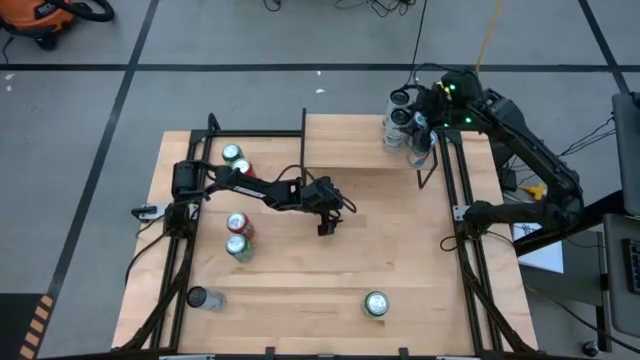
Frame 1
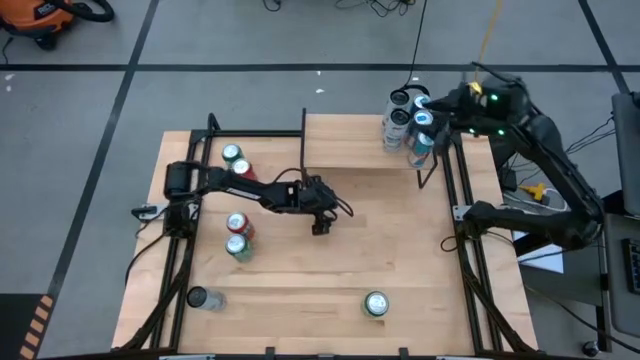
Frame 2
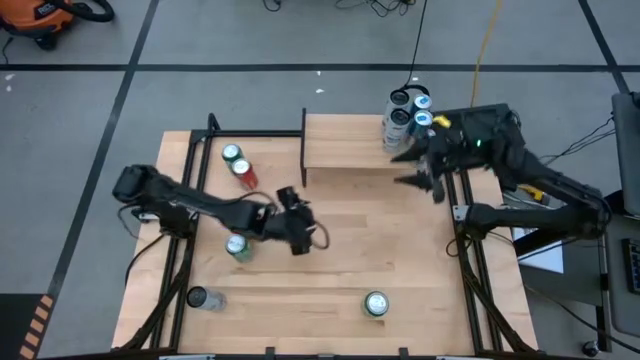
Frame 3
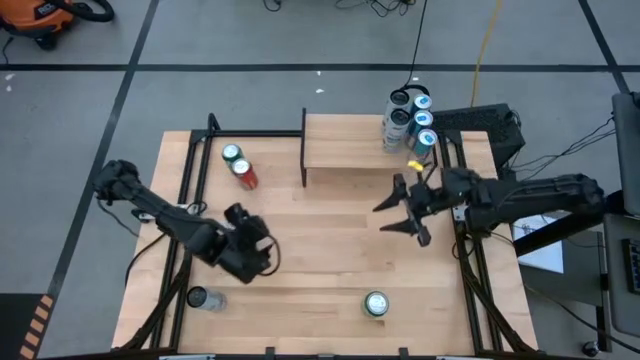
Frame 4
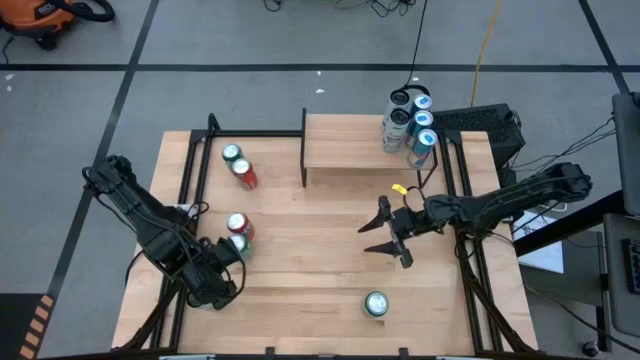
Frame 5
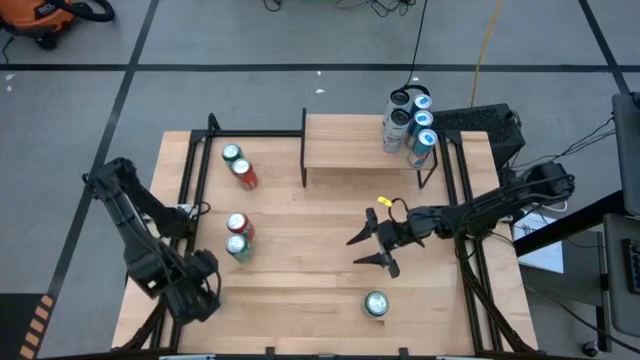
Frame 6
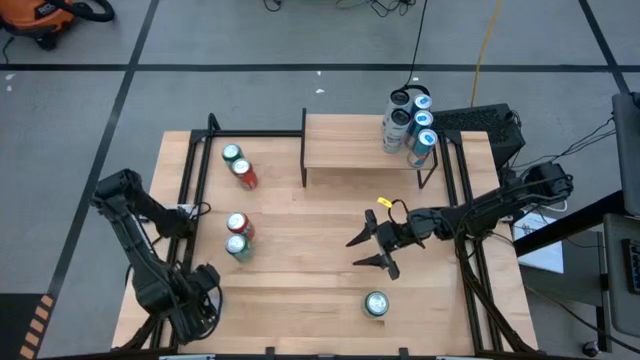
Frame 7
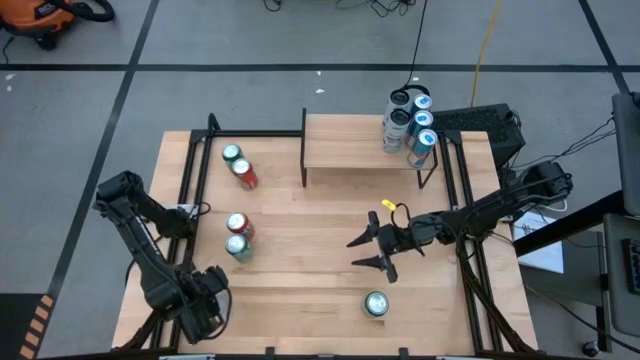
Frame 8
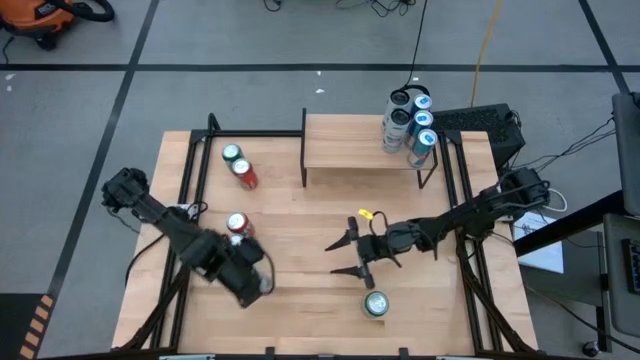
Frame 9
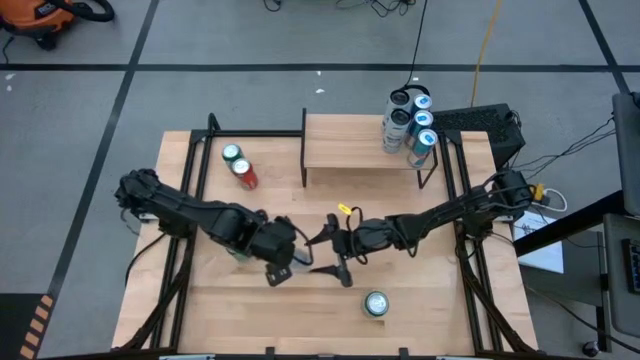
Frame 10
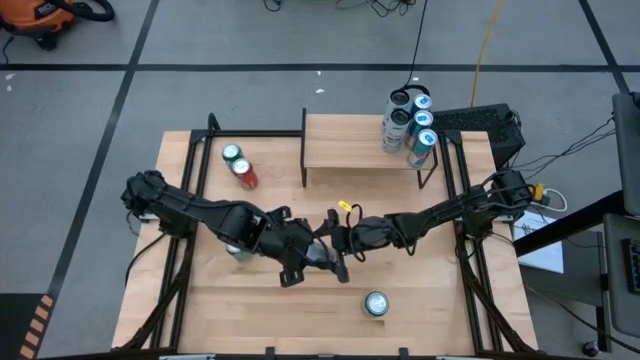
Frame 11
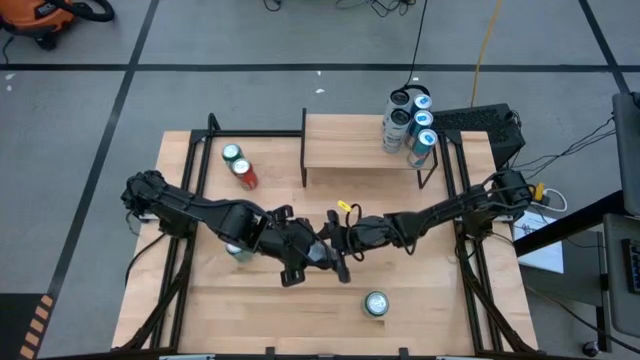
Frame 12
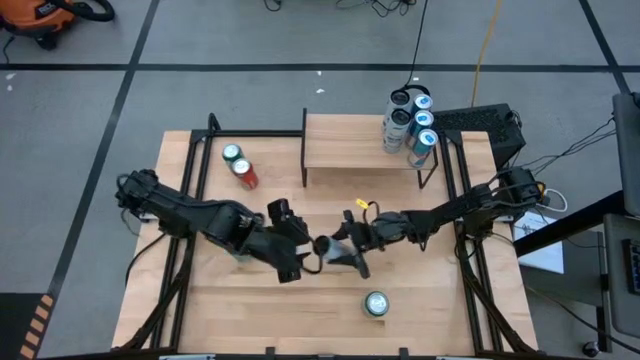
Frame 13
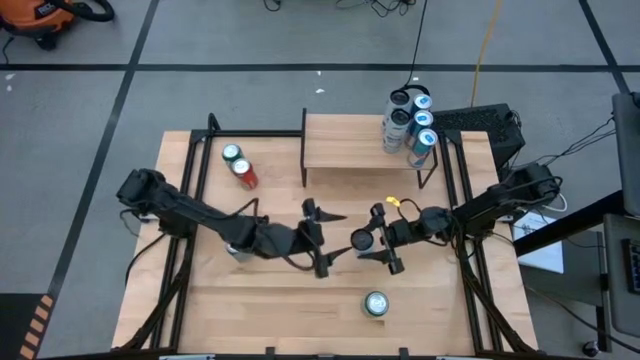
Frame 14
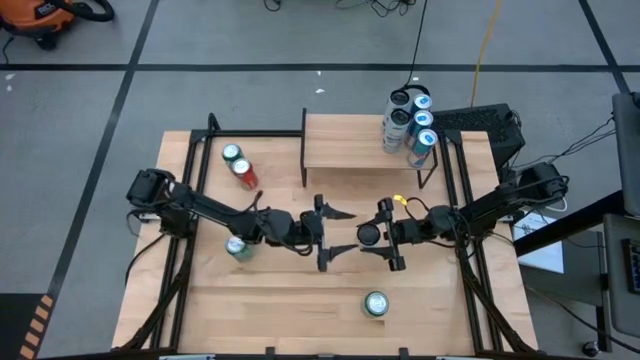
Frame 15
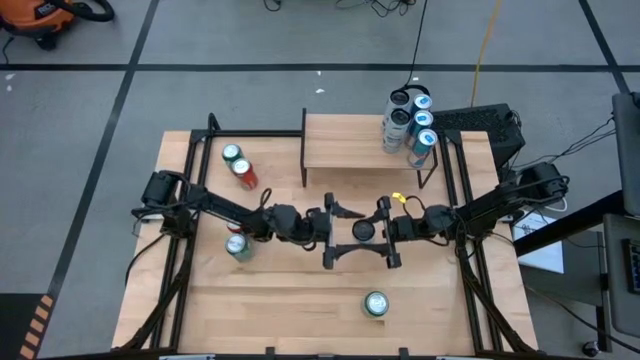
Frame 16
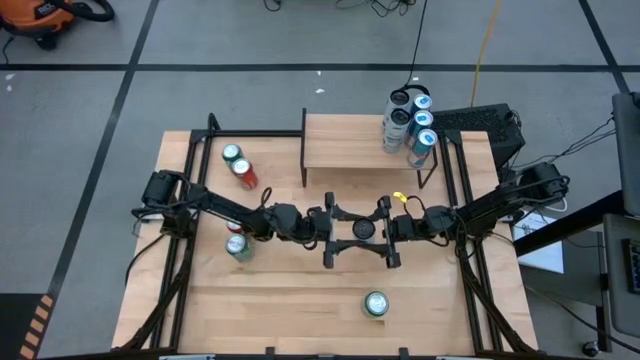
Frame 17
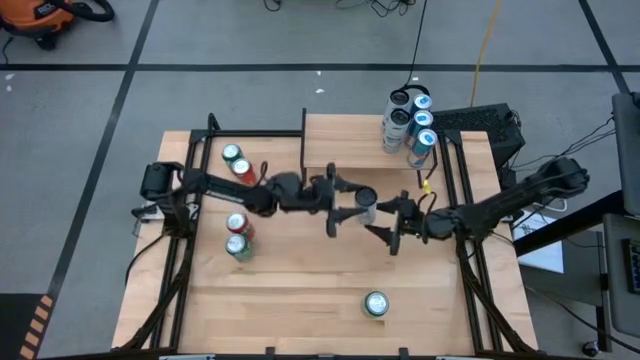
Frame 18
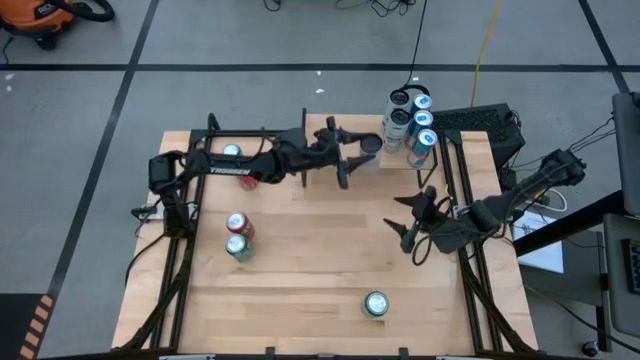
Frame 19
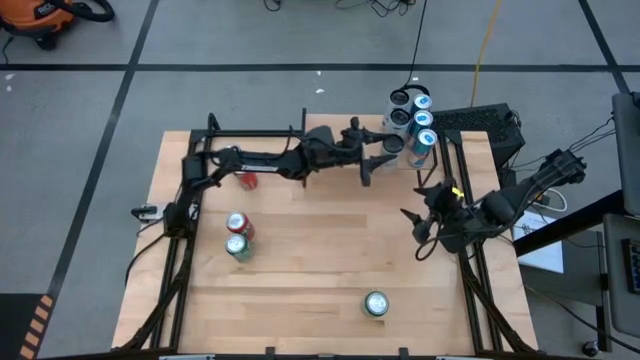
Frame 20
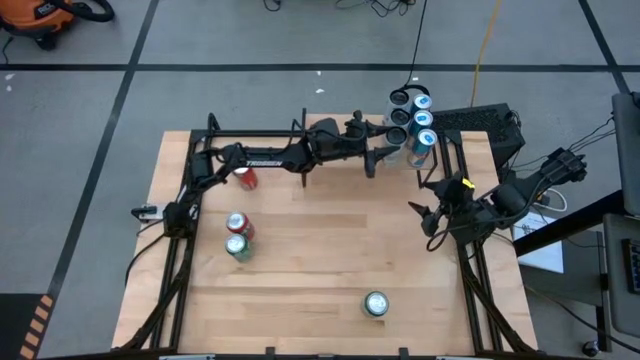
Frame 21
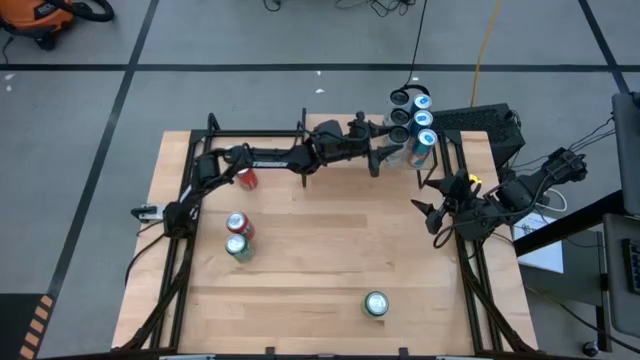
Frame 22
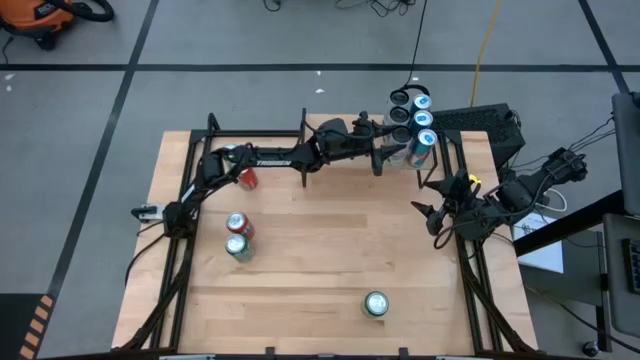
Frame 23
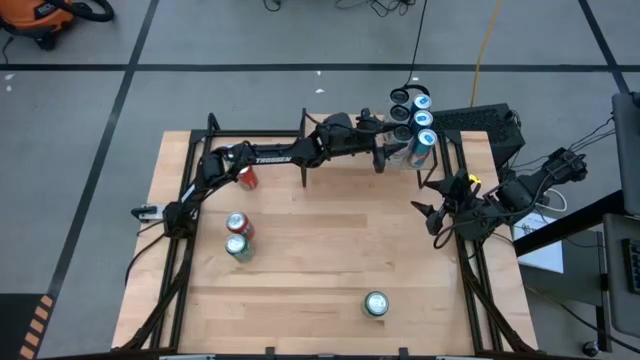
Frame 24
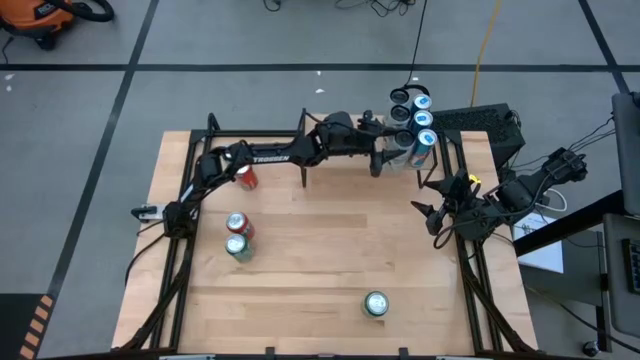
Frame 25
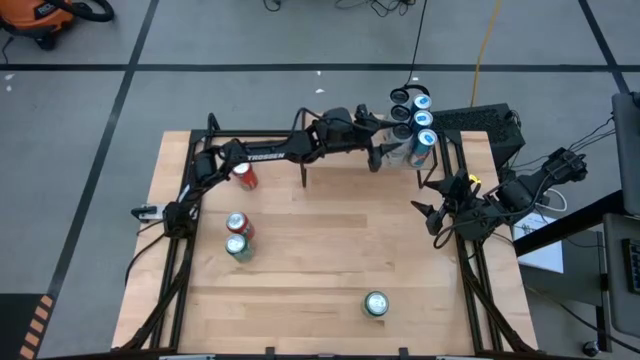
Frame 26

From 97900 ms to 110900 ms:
Task: Place canned beverage on shelf
Put the white blue soda can on the shelf aligned with the other white blue soda can

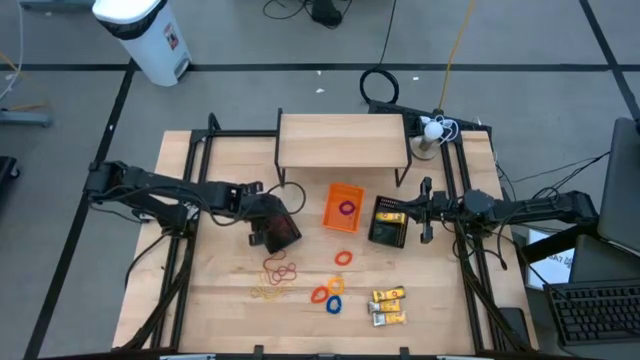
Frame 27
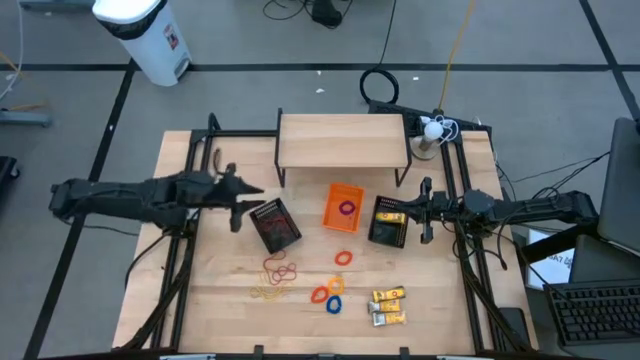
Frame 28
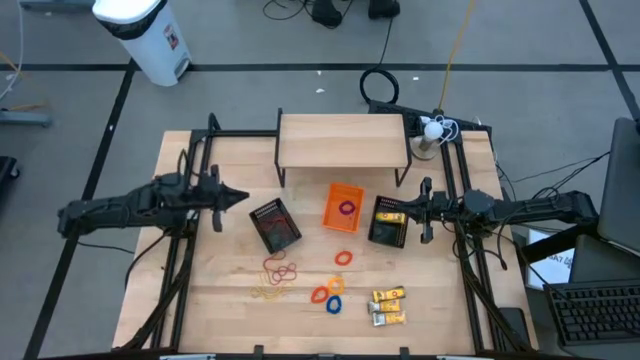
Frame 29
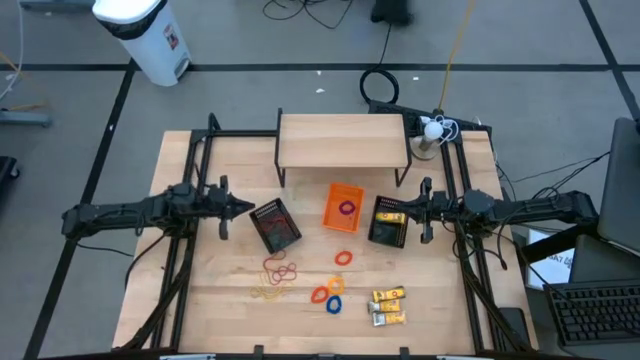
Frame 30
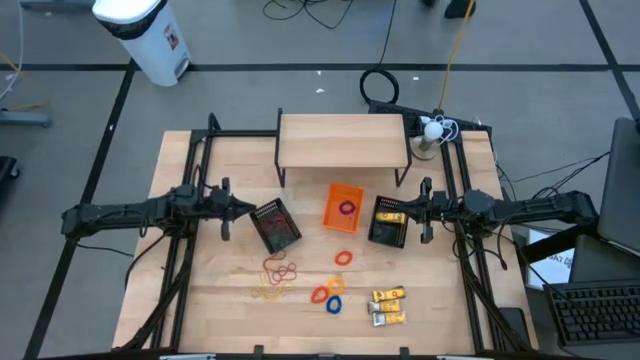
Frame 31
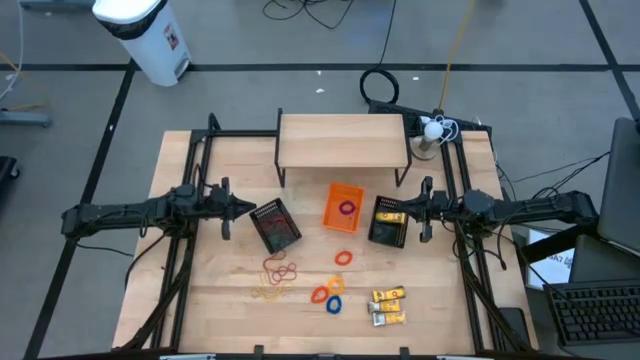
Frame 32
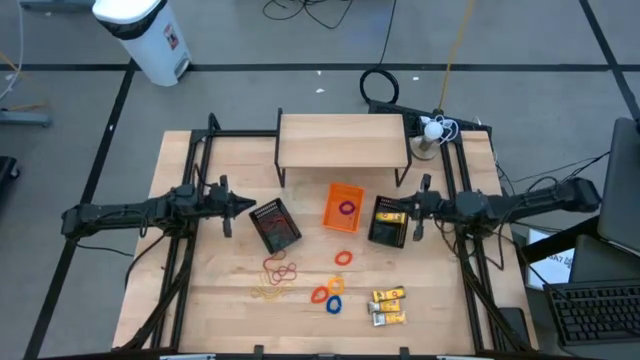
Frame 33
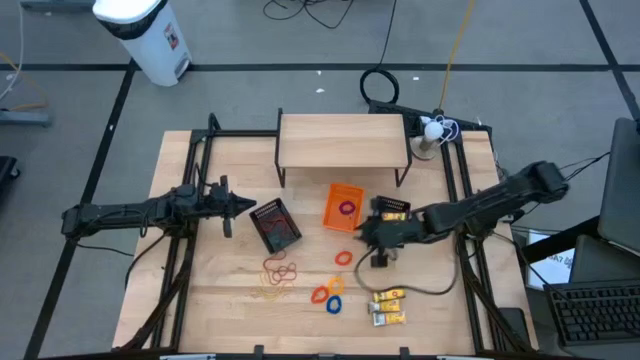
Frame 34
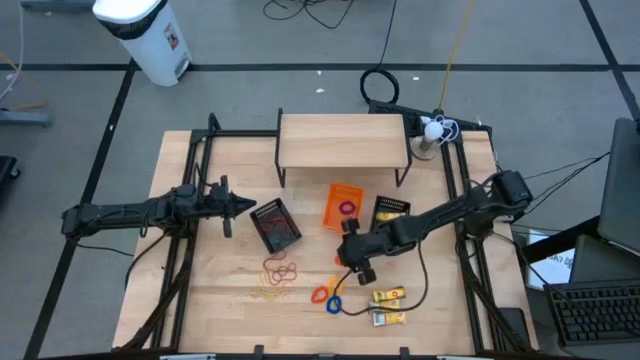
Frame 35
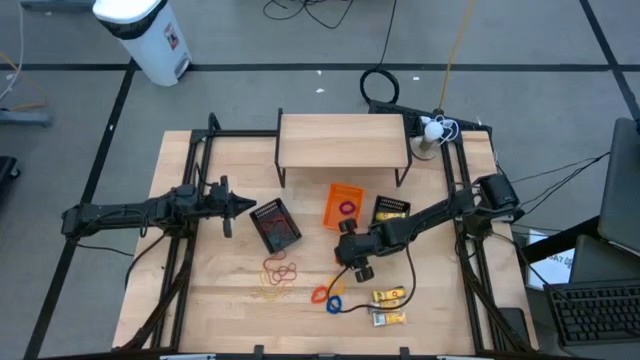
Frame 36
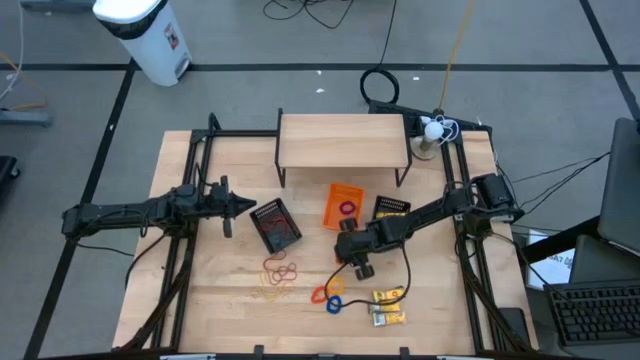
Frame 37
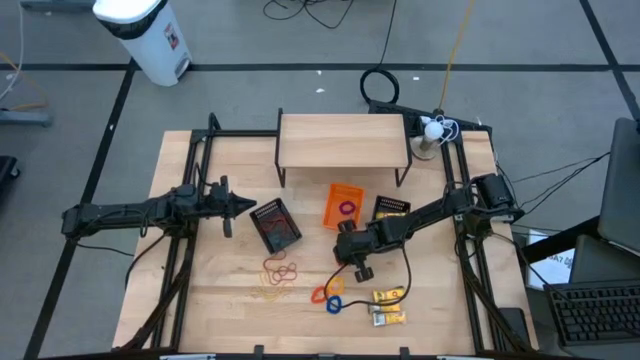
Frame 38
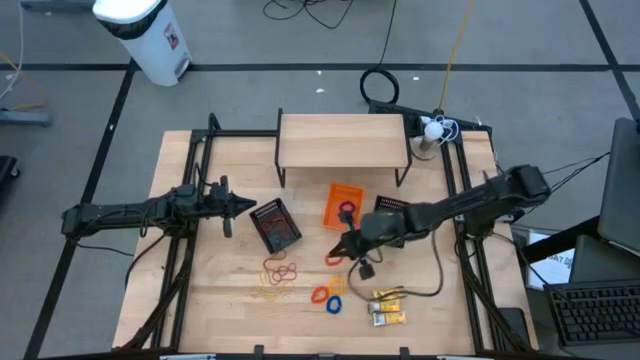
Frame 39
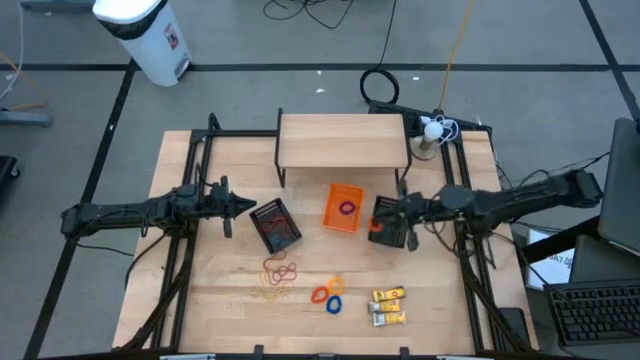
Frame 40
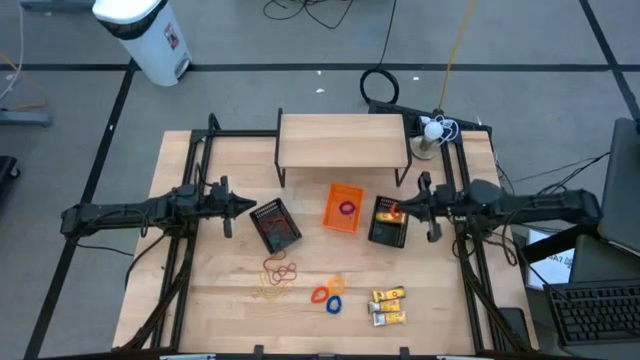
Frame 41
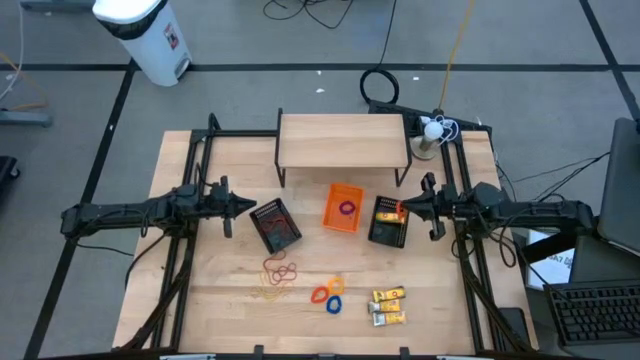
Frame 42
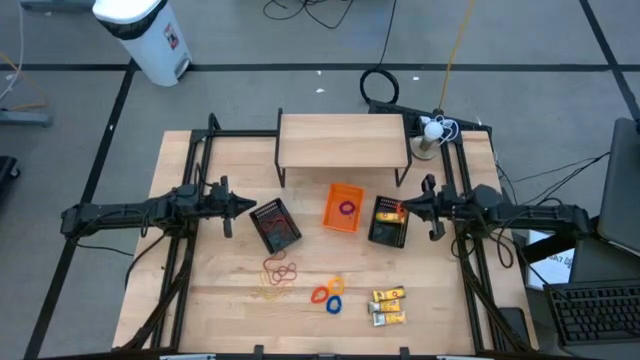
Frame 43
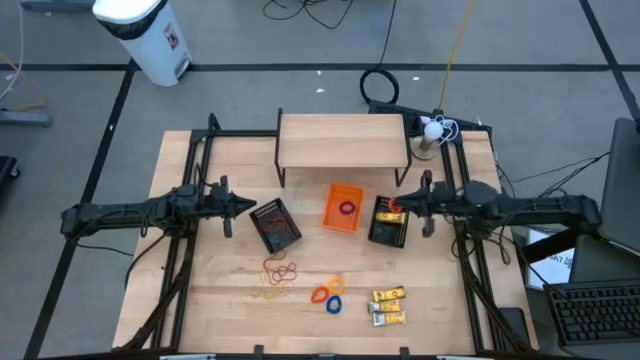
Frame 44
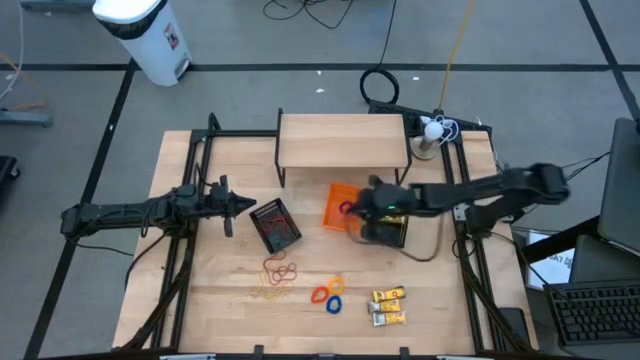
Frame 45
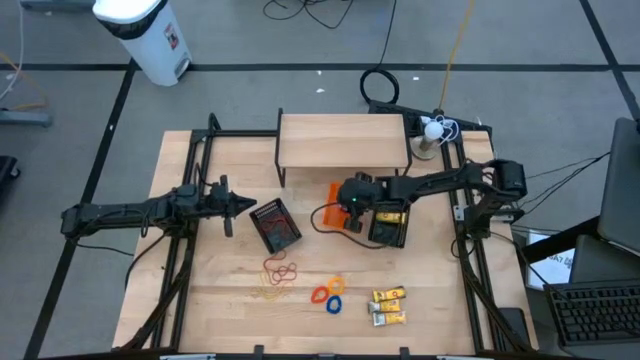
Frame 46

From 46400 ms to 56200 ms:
Task: Pick & Place Office Desk Supplies
Put the orange spring keychain into the orange bin
